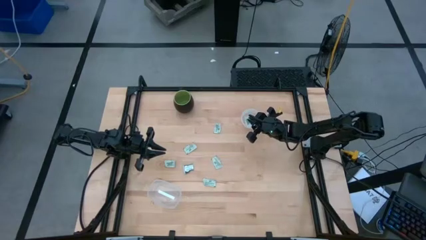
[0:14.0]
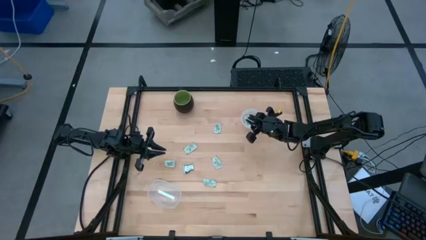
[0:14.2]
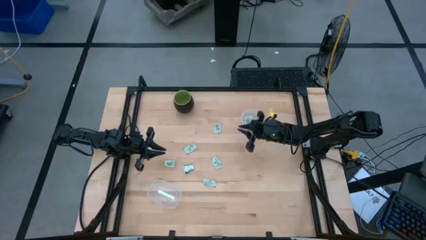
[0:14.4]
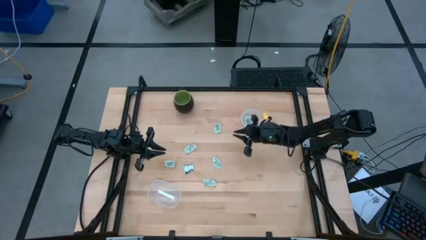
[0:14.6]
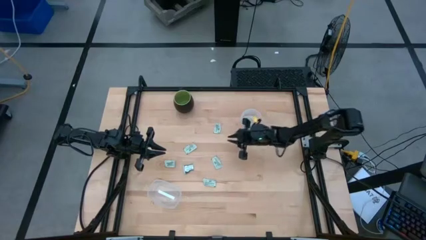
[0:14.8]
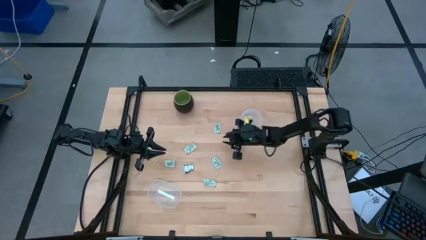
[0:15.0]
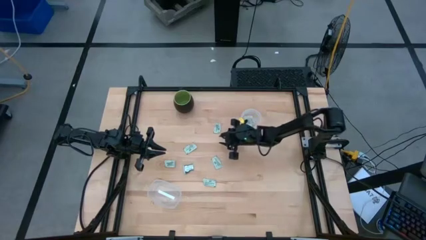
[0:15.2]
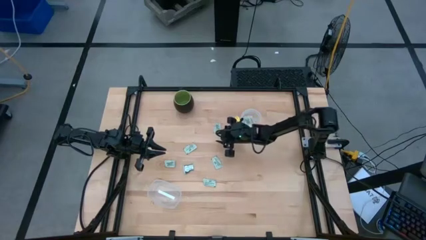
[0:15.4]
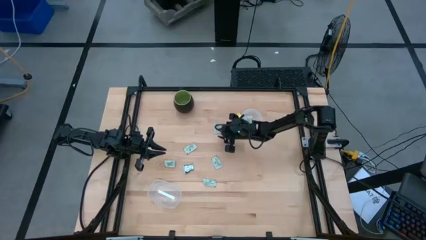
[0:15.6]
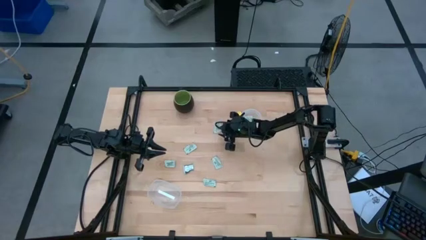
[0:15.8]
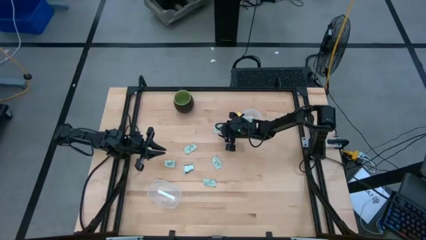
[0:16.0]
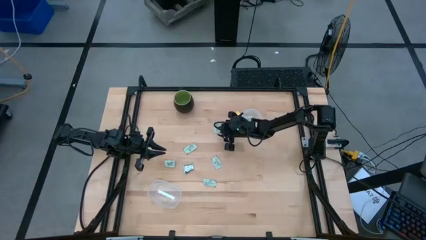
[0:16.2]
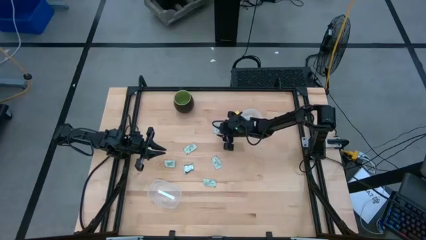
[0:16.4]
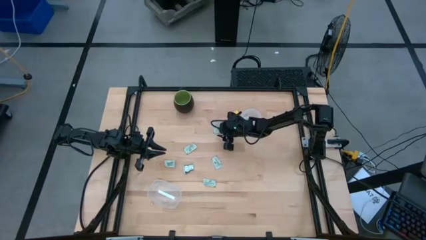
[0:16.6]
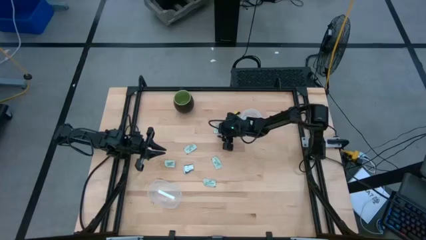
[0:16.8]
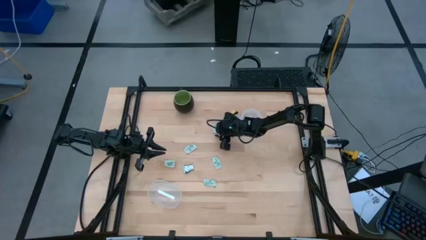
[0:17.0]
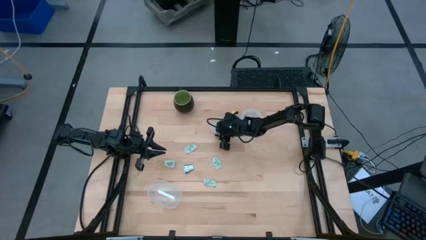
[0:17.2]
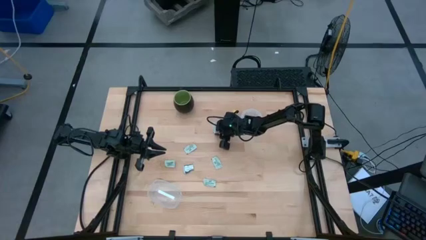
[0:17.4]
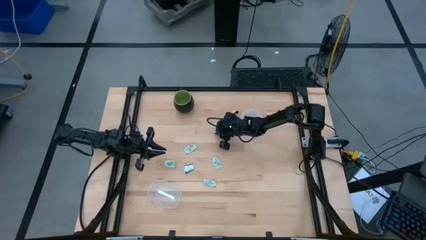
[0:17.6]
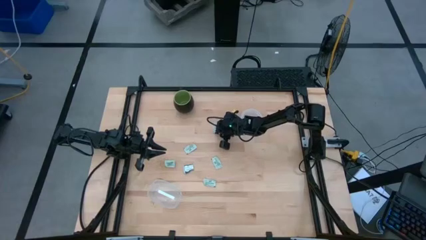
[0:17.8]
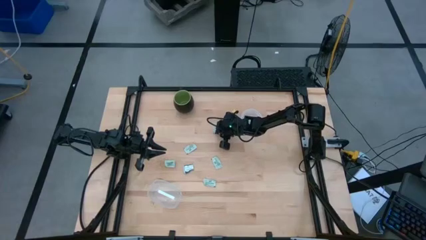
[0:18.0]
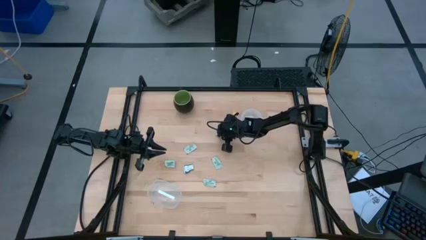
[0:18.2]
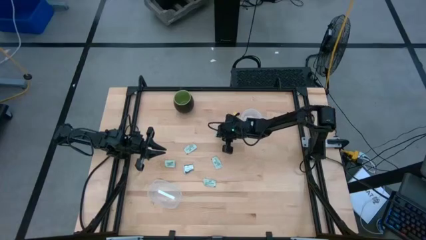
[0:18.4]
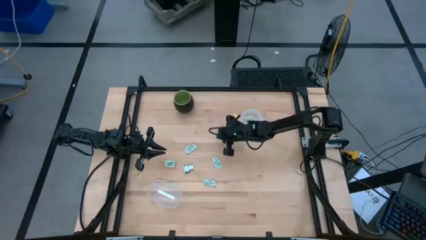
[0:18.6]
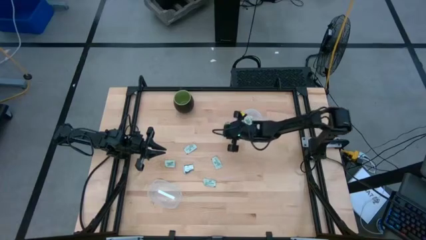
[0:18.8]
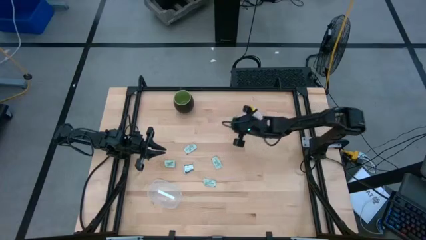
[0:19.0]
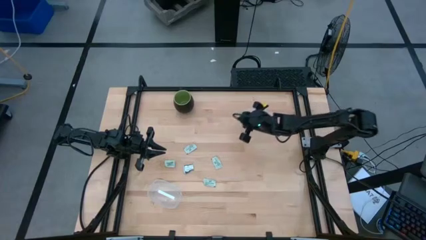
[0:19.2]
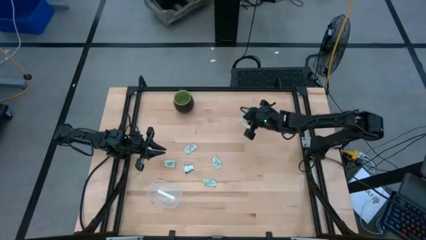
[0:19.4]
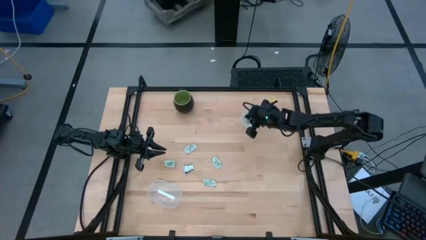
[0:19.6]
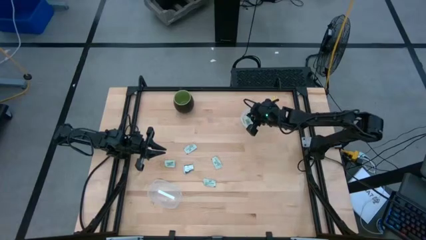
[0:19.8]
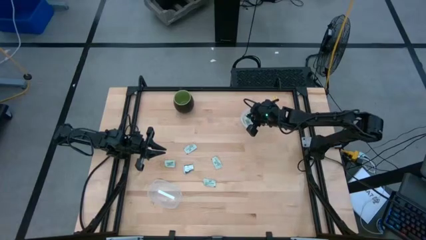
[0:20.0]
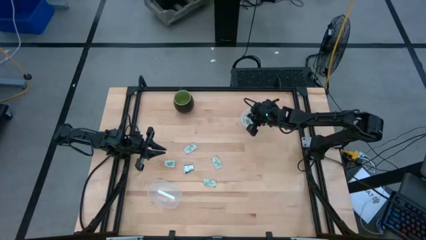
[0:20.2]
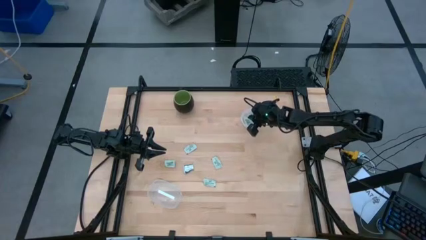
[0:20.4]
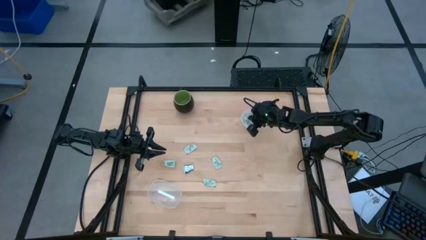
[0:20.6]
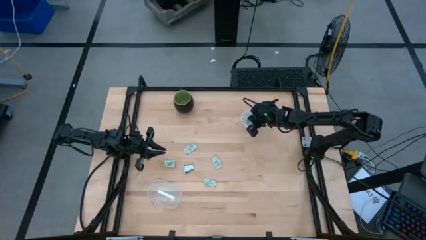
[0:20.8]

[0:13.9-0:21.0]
Task: Pick and place items into bin
Put the green stevia packet into the top transparent bin

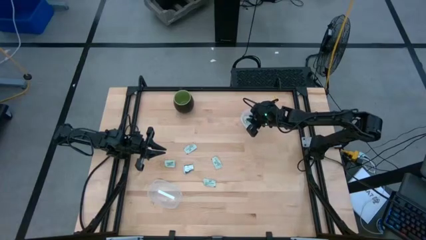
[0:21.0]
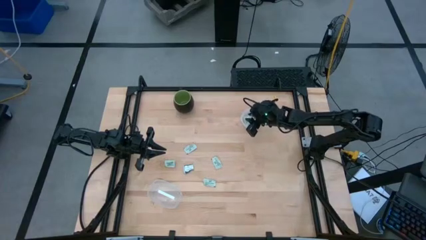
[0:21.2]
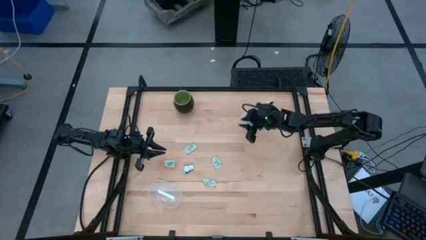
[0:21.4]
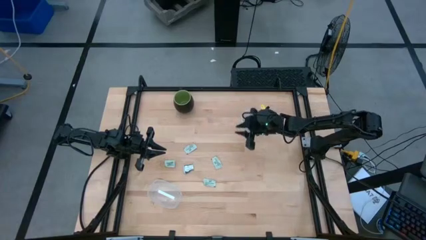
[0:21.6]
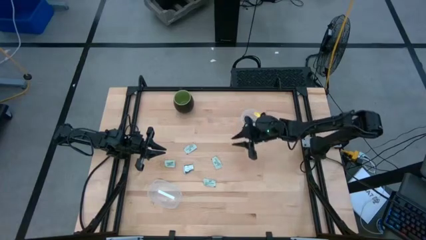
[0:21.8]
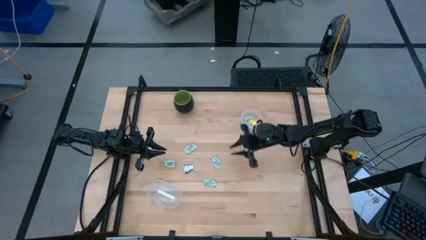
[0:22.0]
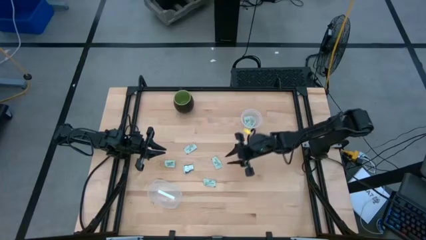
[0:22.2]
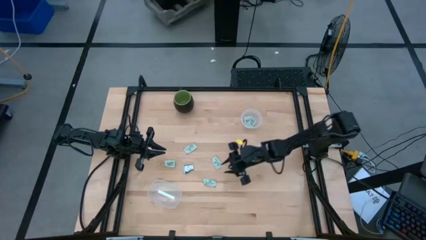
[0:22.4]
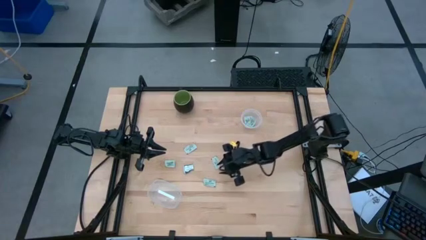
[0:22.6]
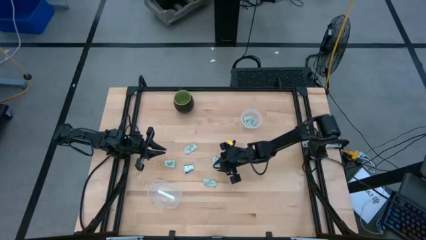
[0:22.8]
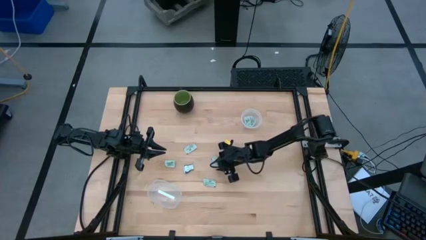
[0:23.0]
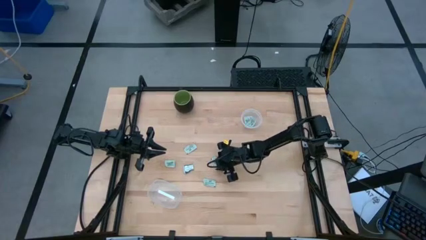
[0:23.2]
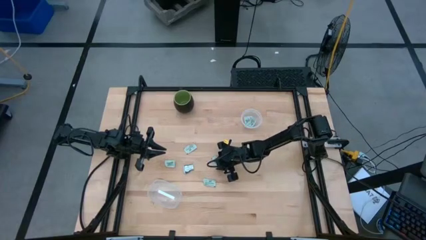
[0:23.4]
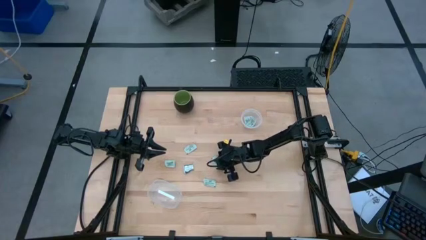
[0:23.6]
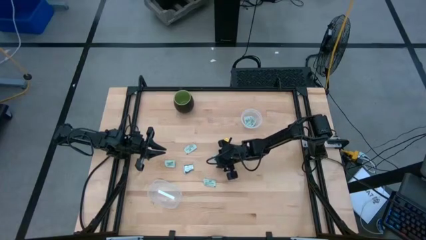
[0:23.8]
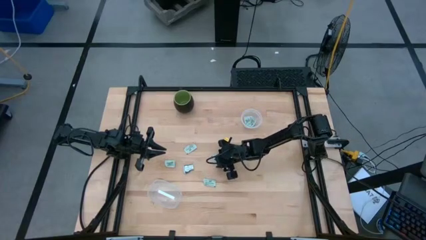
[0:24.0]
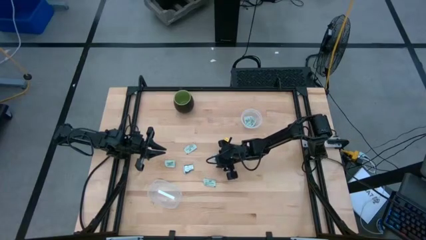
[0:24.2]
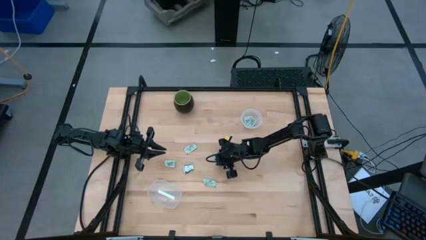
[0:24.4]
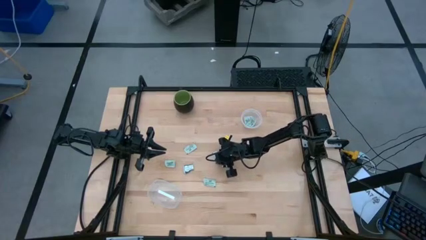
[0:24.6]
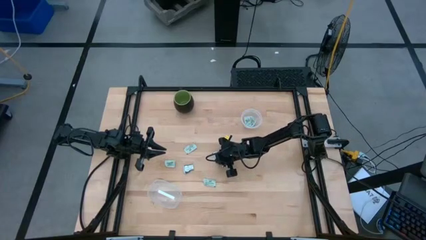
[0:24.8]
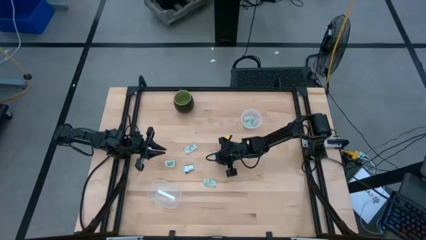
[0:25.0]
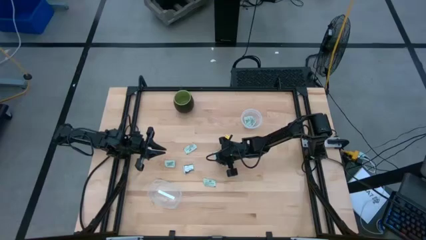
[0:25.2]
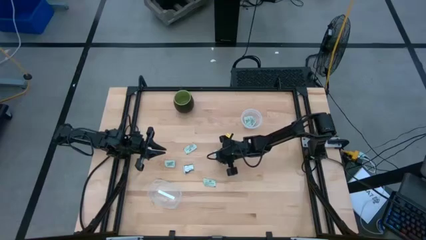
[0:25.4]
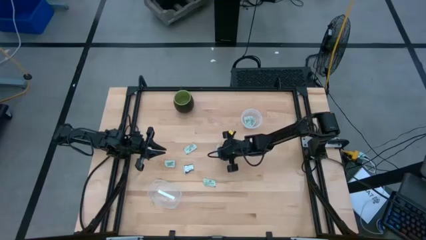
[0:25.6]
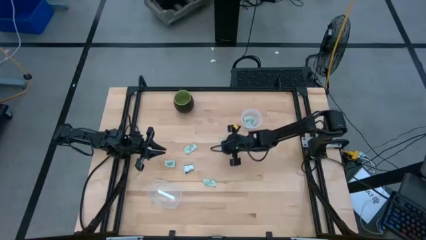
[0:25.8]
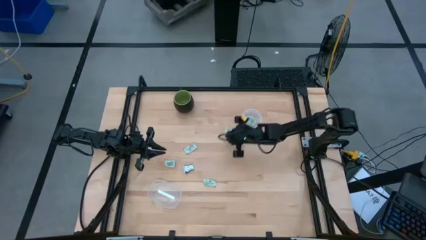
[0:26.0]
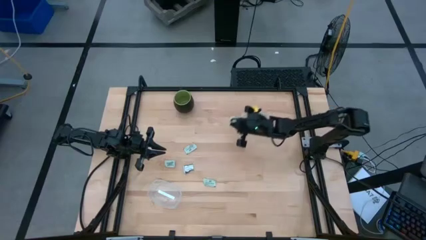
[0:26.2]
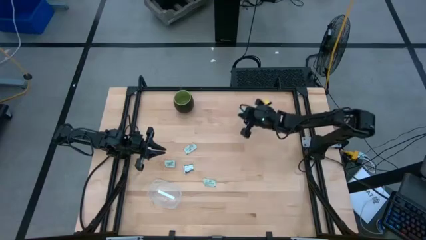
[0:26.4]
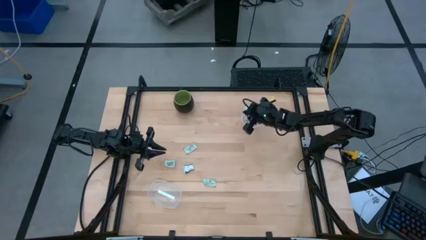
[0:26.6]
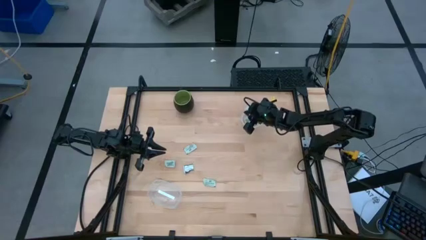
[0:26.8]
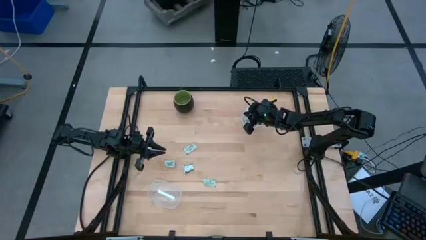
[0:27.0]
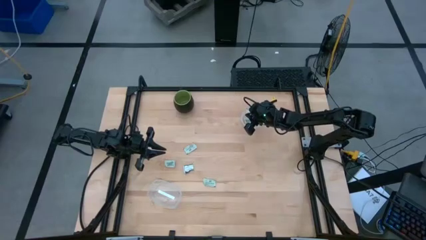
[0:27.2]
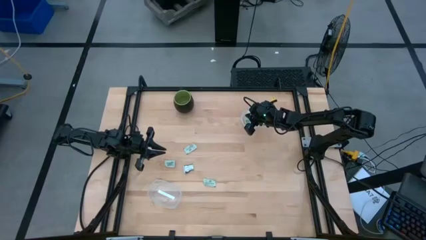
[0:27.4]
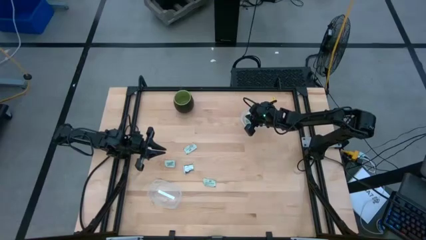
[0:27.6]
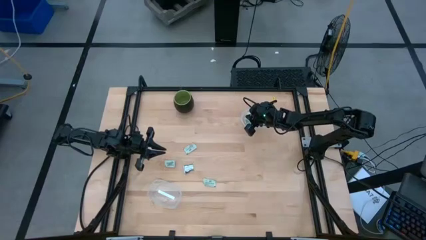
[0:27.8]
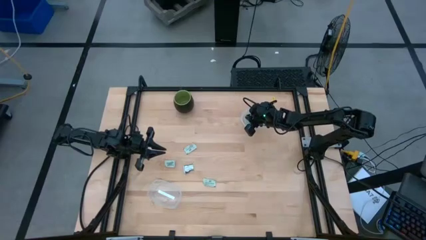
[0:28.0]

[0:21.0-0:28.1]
Put the green stevia packet into the top transparent bin

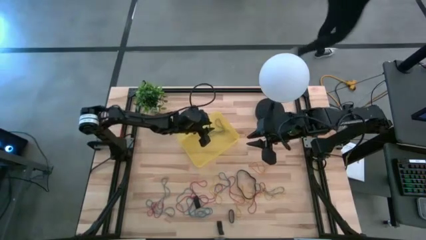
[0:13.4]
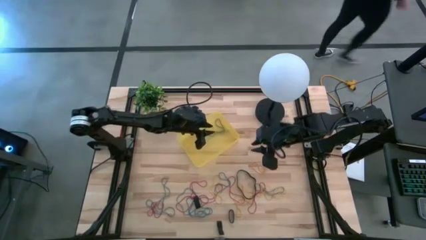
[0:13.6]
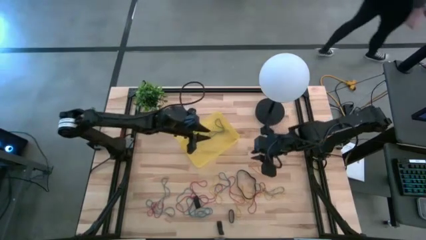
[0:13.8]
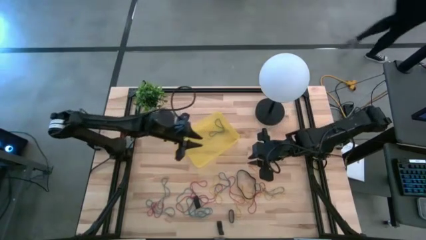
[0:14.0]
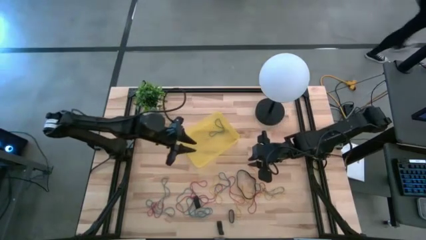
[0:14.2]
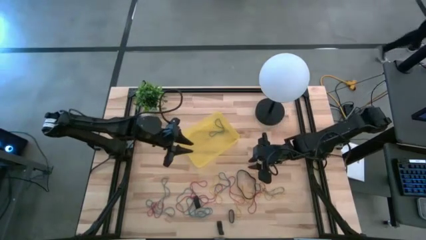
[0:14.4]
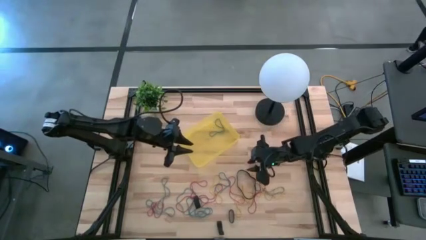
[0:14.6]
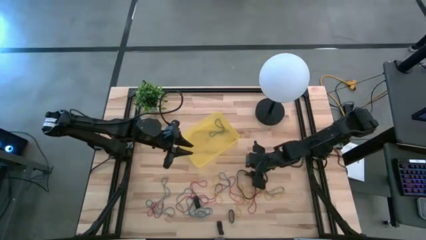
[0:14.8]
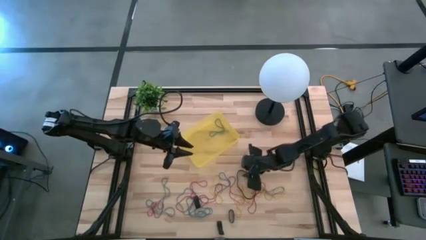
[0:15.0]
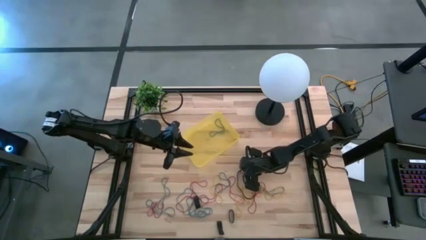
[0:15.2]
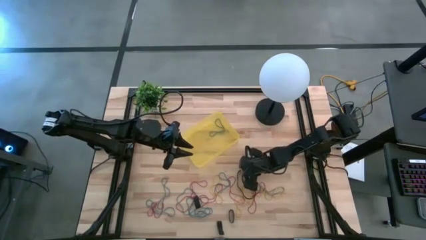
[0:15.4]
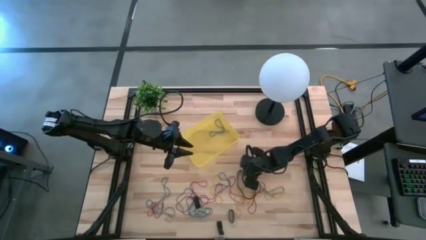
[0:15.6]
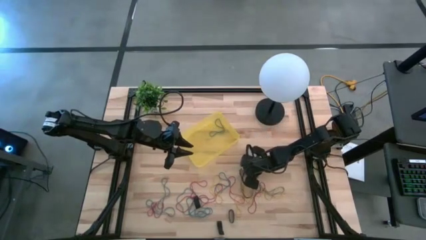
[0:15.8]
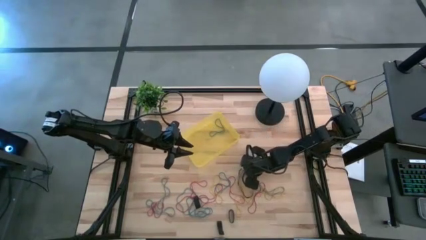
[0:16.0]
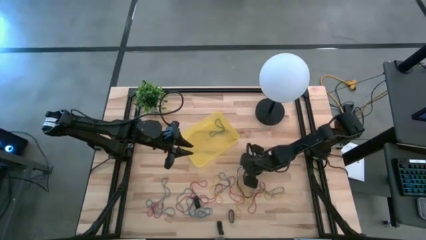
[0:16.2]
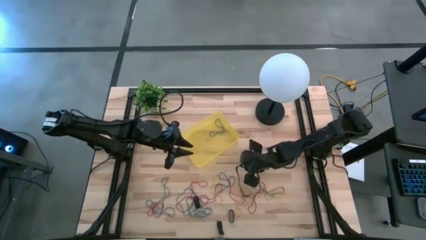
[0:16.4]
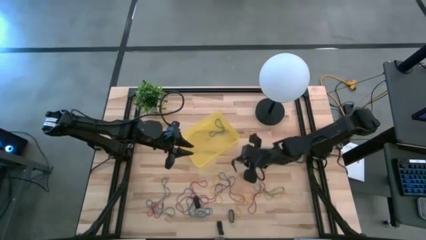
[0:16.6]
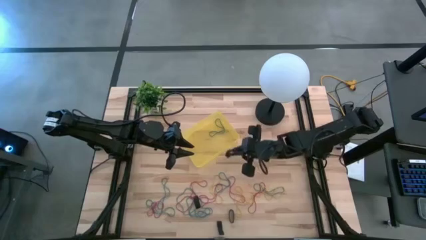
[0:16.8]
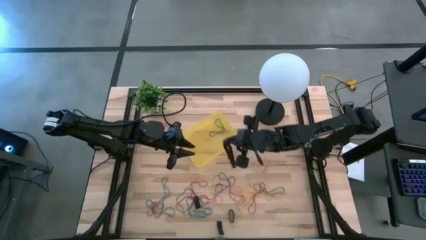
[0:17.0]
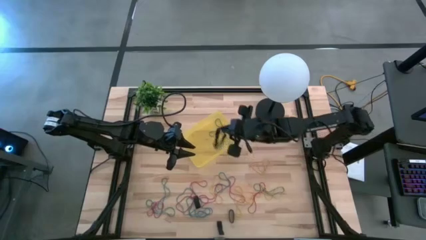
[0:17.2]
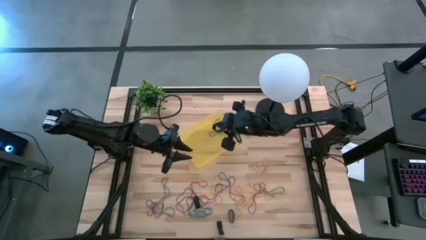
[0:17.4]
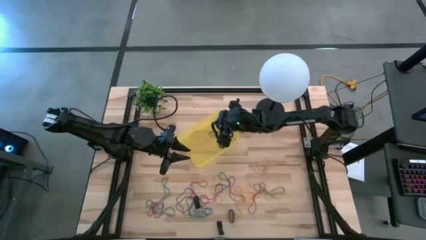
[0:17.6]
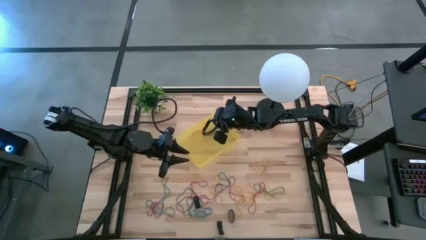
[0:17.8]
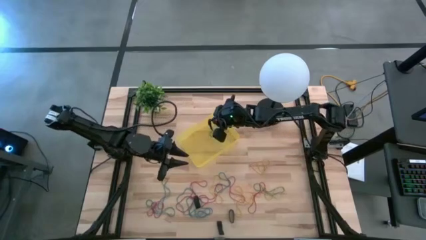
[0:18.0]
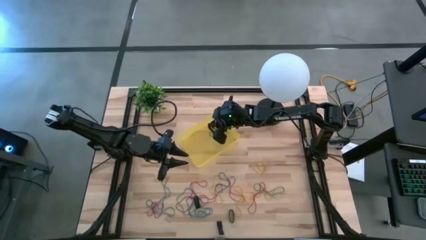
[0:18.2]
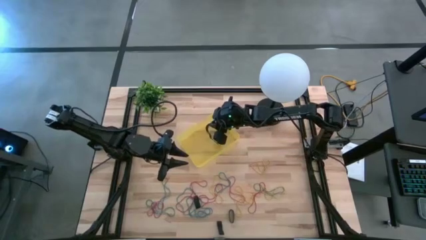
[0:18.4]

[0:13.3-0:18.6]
Task: Pick and place rubber bands into bin
Put the black rubber band into the yellow bin
